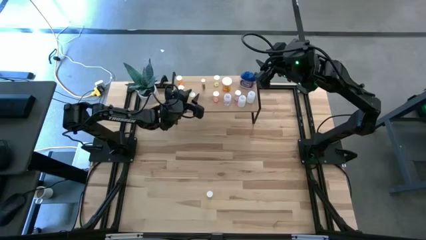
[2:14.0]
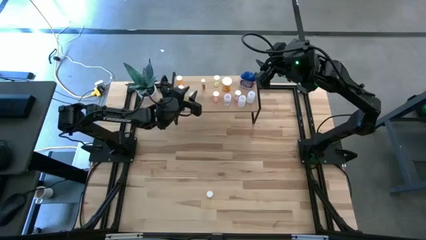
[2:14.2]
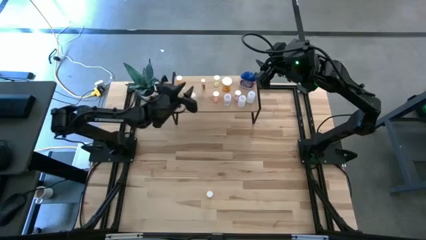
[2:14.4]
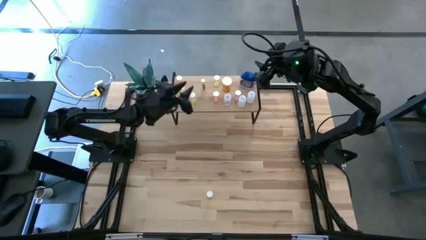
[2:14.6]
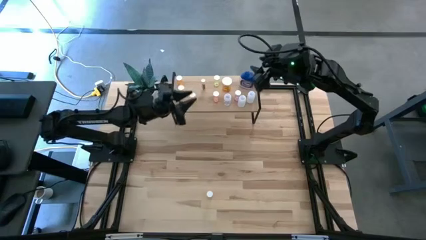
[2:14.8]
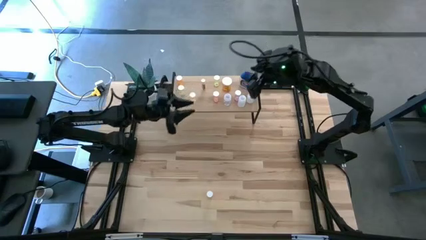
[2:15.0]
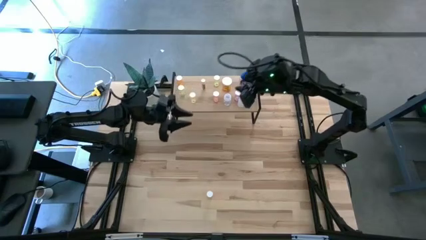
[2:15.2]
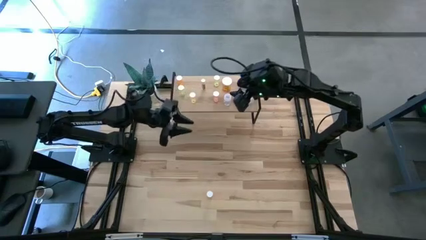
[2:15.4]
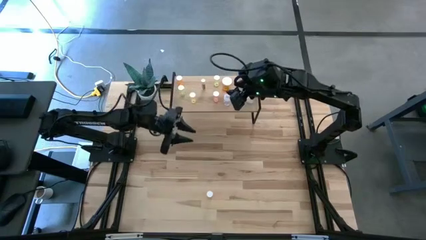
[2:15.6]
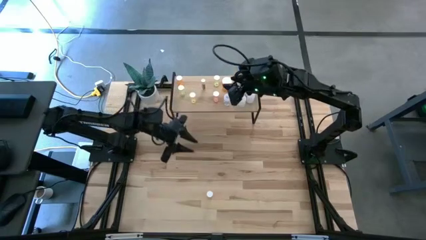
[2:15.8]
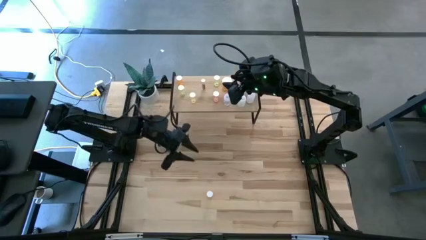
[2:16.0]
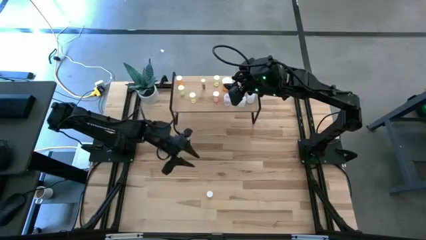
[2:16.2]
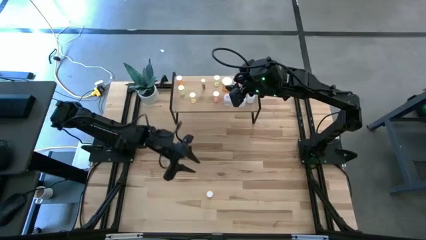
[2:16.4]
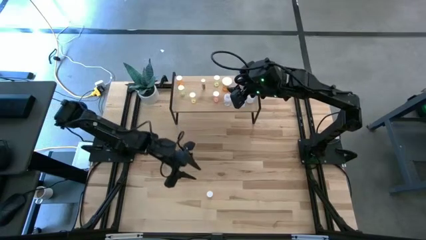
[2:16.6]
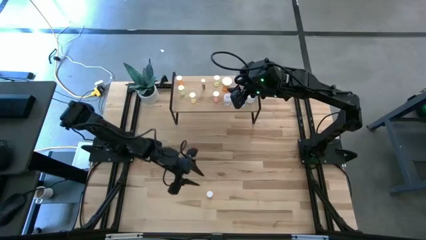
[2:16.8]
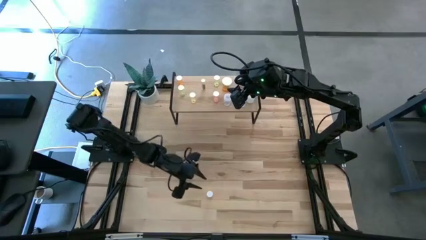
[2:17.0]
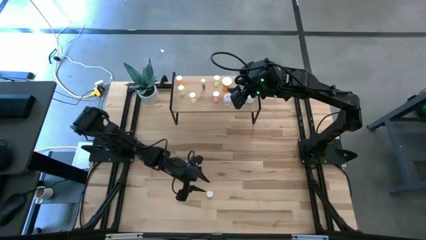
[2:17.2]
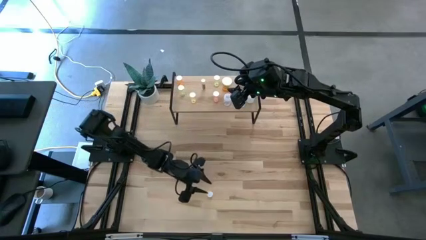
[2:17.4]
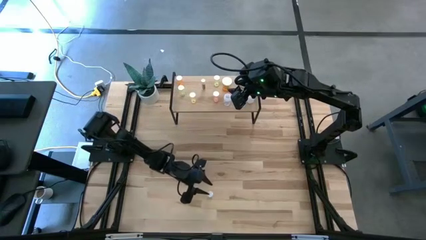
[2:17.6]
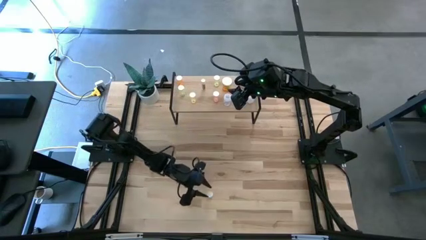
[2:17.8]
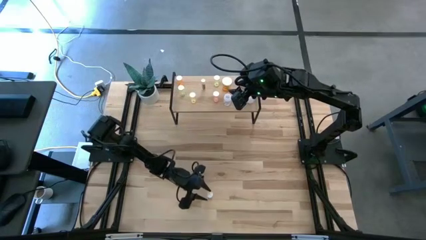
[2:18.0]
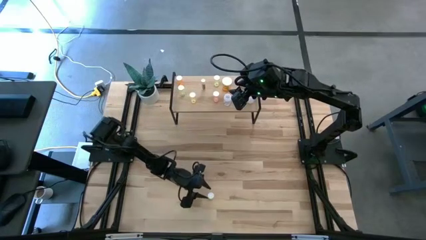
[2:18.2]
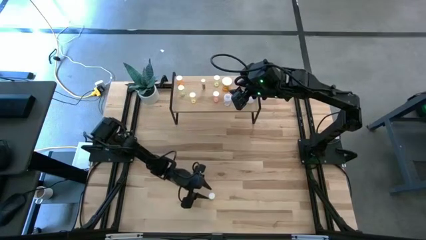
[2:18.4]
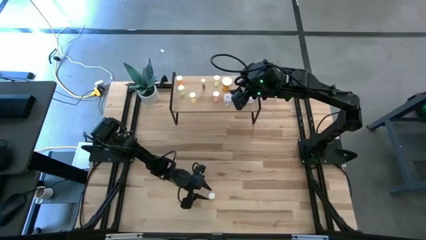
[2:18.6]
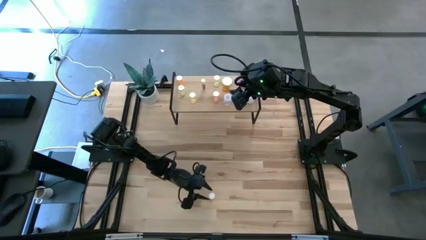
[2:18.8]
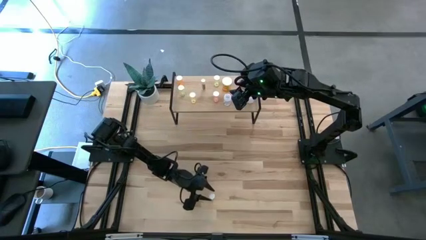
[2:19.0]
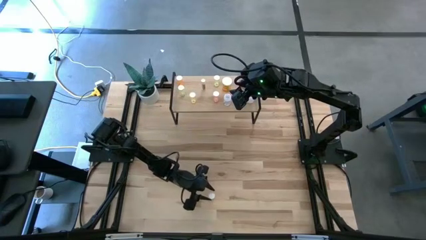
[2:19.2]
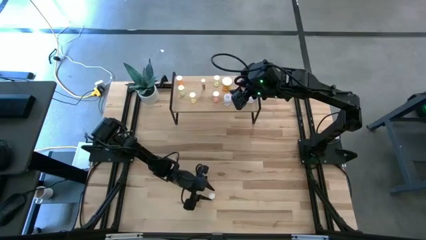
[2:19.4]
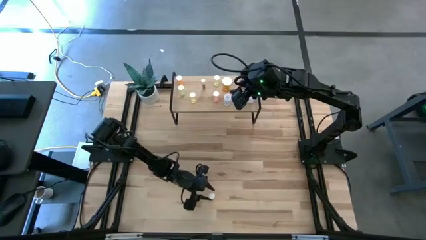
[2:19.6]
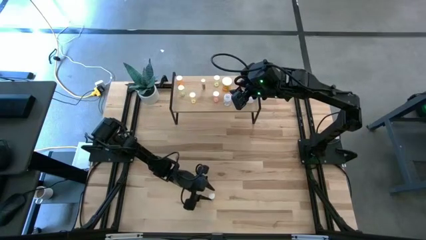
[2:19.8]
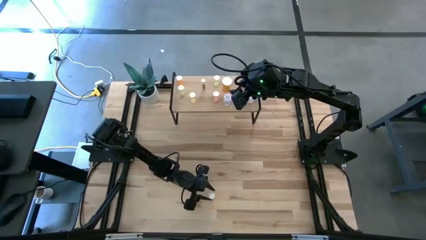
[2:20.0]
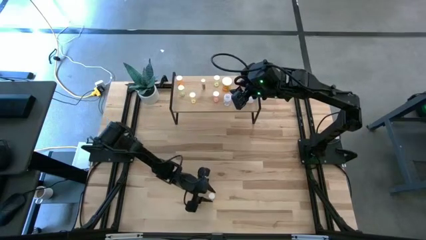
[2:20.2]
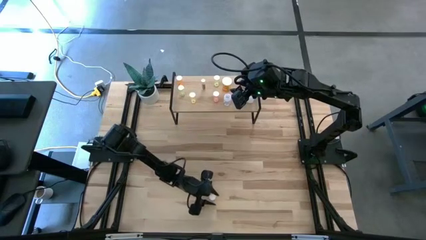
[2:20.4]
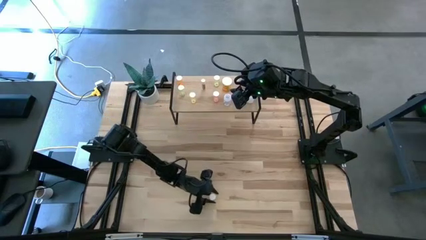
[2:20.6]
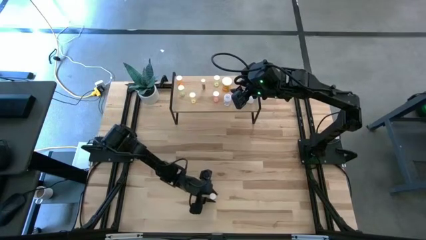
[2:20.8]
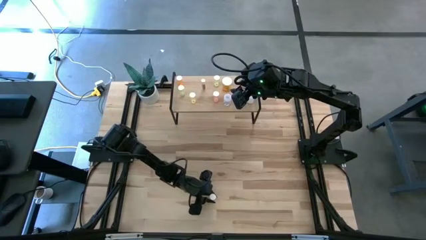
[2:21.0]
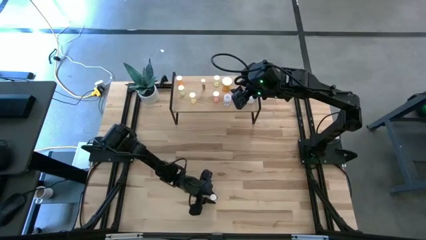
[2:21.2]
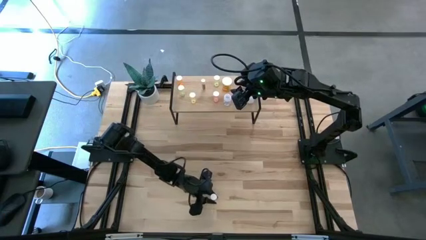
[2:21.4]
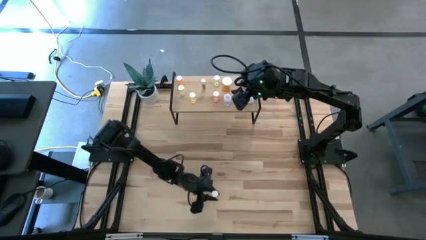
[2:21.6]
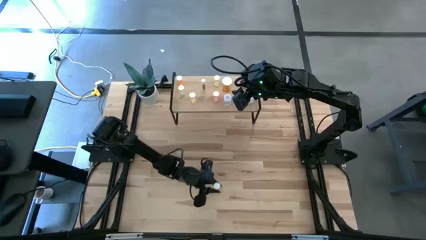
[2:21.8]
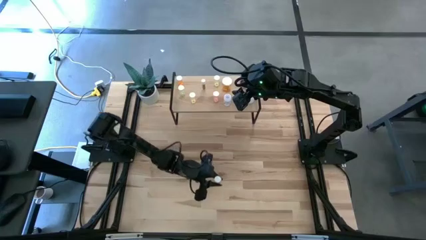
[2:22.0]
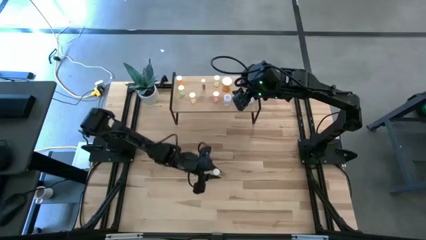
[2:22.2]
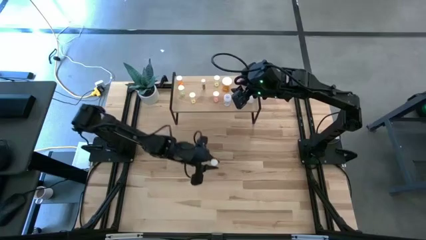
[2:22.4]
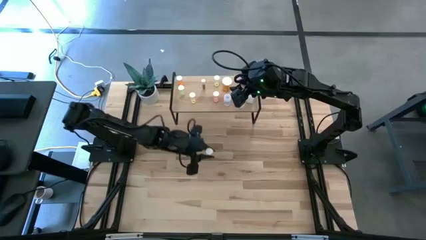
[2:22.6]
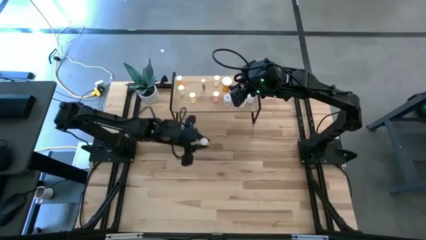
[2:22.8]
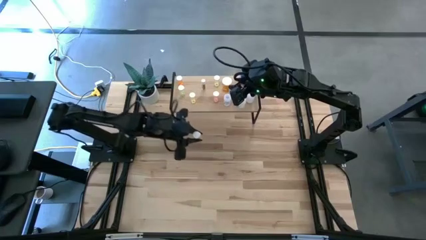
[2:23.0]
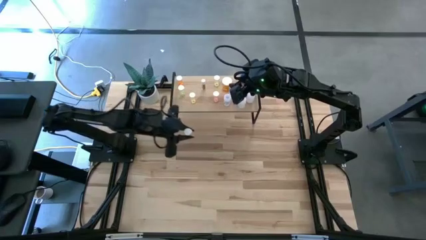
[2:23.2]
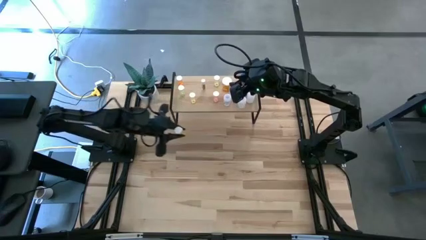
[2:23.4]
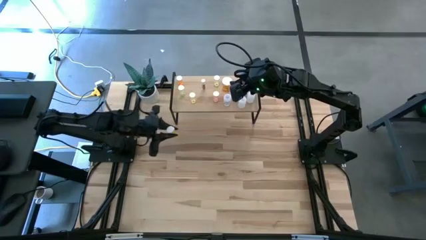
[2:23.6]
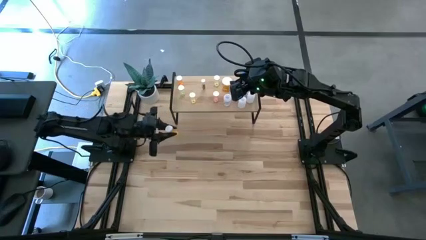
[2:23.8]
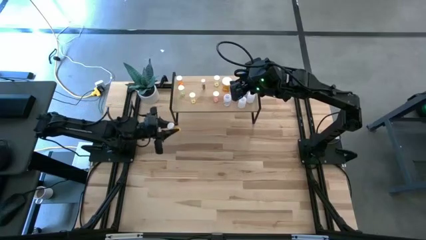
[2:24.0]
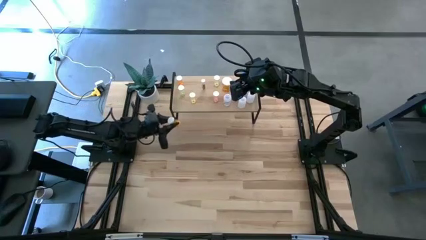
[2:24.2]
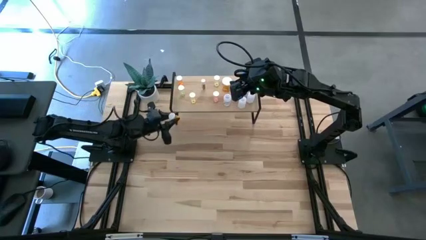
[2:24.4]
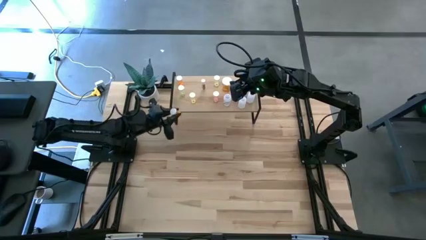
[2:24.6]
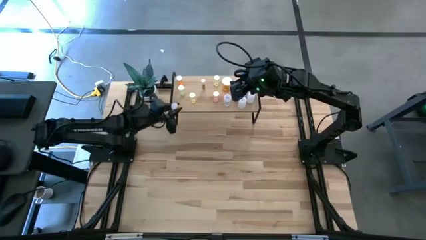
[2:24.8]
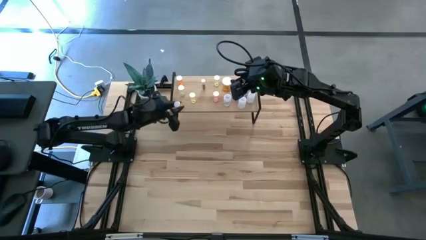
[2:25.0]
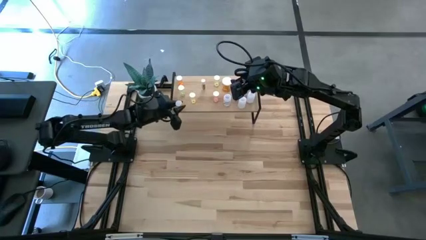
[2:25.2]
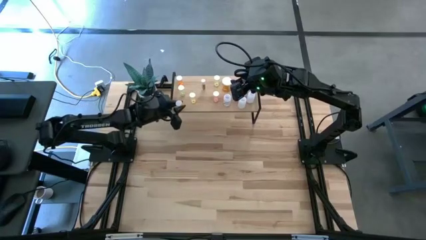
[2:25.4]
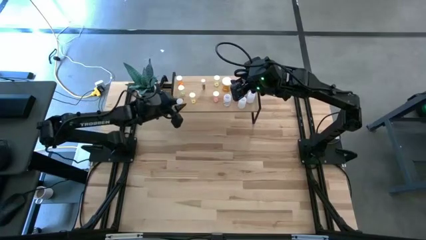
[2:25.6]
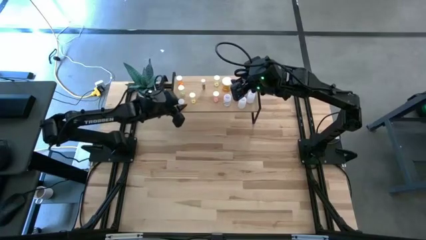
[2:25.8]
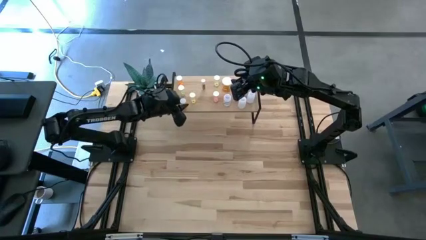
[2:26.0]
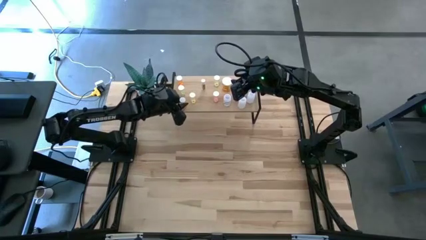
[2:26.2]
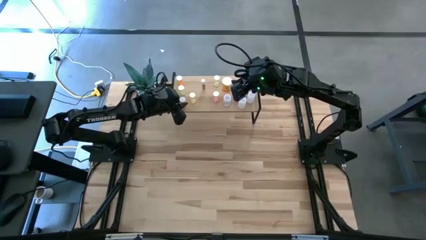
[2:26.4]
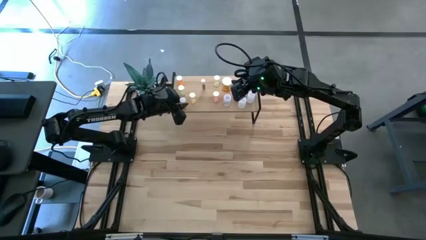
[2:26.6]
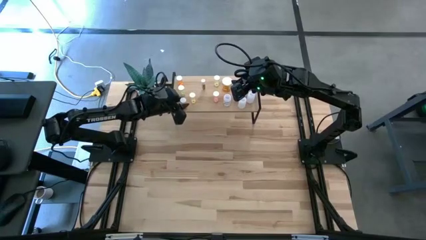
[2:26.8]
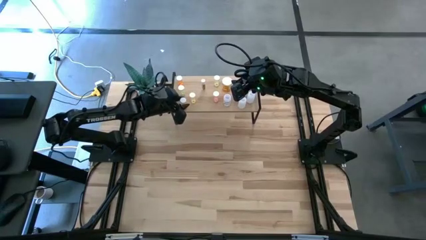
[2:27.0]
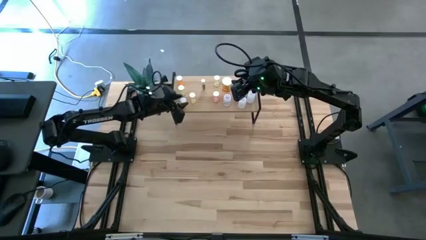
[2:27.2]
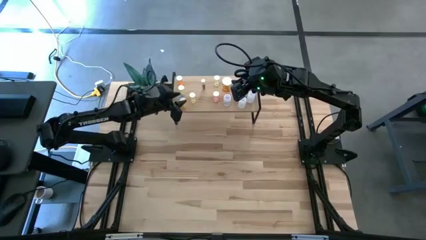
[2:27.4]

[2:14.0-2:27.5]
Task: Pick and place medicine bottles onto shelf by color
Put the small orange pill bottle on the shelf

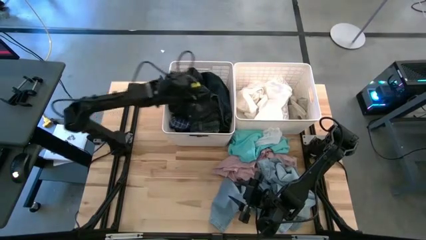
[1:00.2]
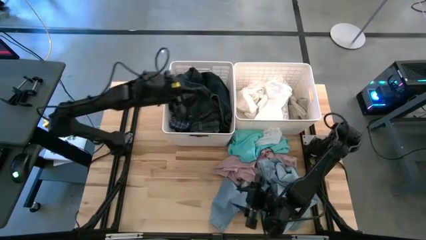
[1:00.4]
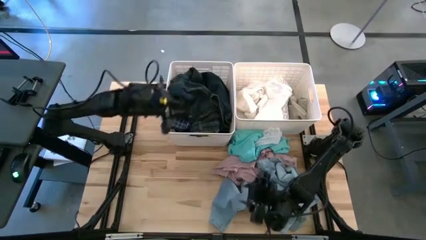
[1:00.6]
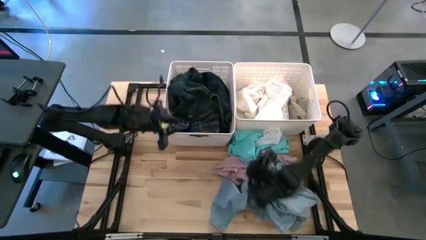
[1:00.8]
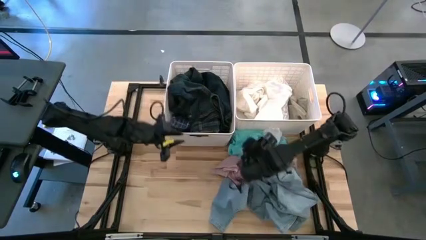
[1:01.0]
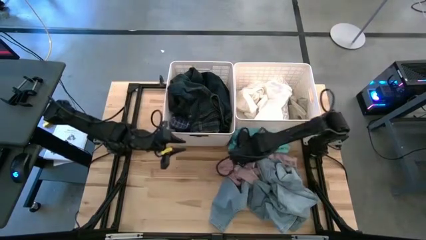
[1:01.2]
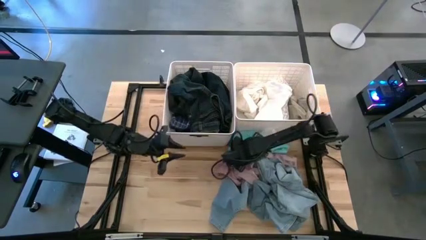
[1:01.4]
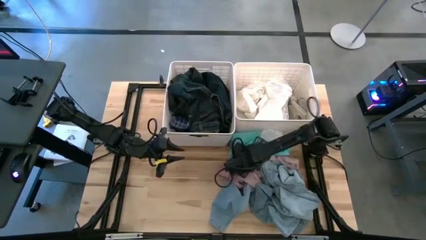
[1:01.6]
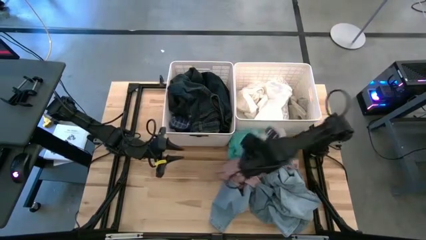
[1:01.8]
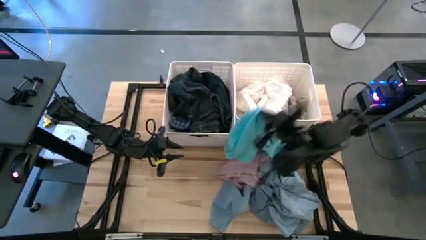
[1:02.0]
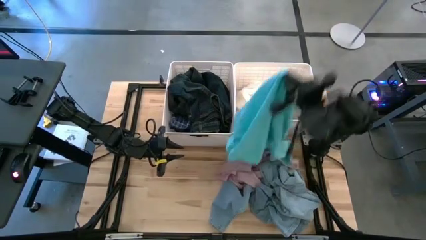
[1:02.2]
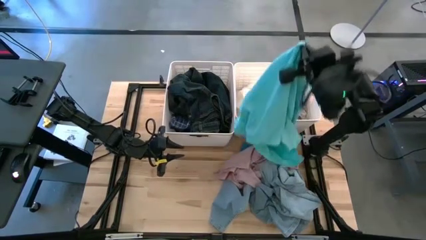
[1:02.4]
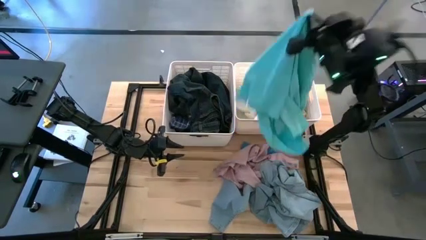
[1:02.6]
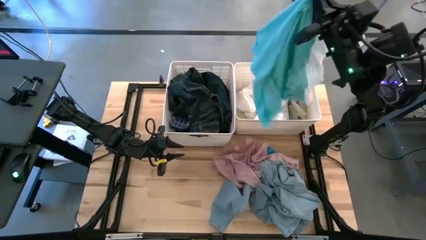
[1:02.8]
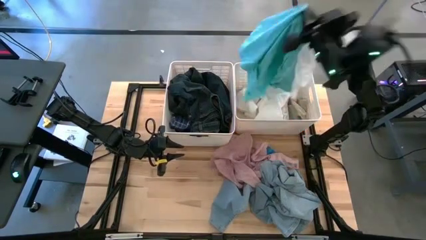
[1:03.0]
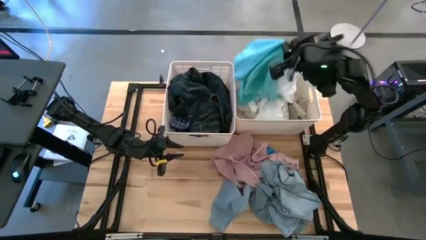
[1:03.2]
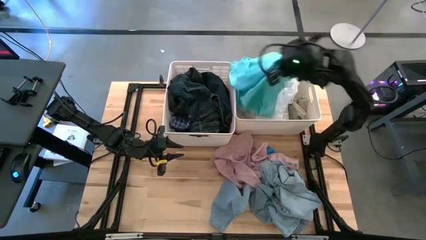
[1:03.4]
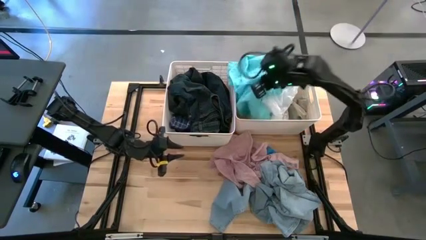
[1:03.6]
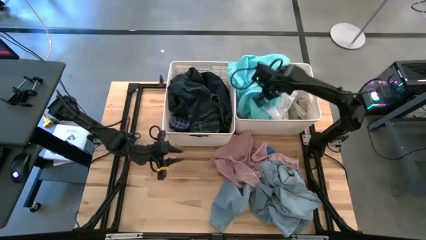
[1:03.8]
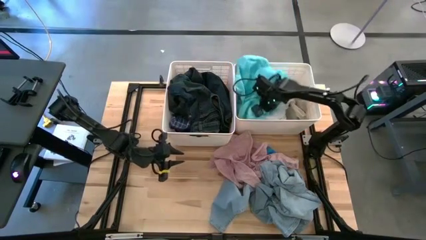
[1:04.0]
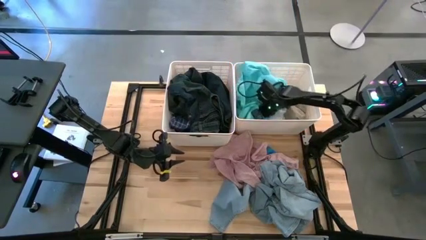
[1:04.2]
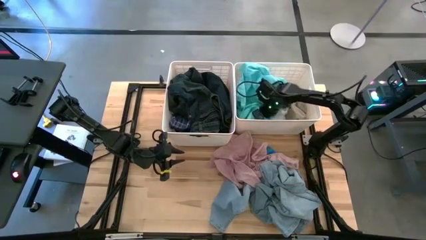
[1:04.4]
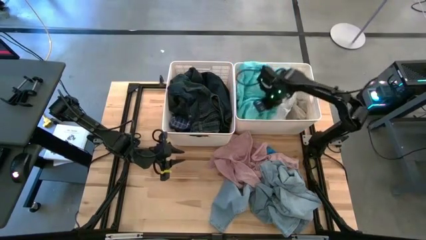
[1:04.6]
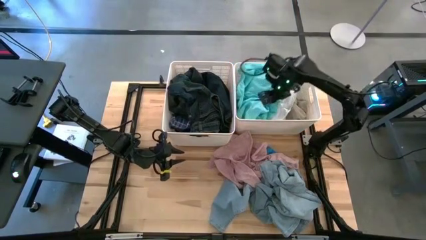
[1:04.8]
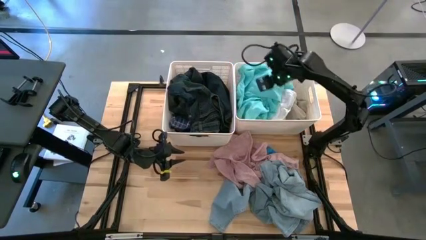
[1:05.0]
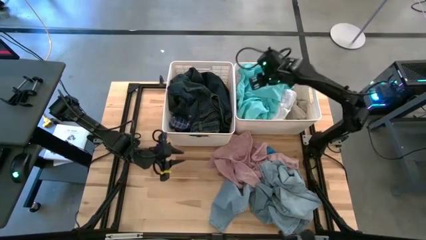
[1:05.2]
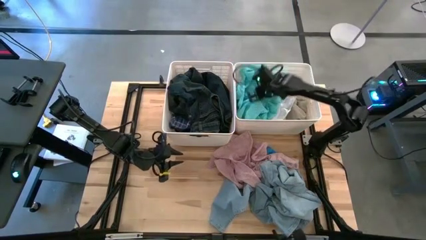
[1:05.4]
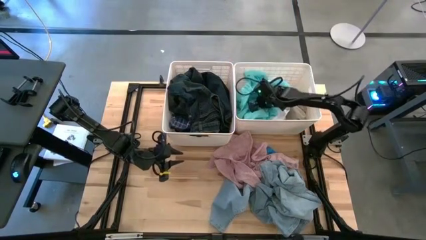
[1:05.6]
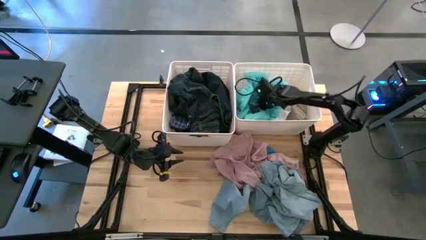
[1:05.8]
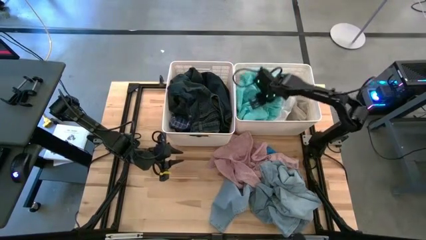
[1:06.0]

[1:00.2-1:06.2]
Task: Sort clothes
Put the light blue shirts into the right white bin
